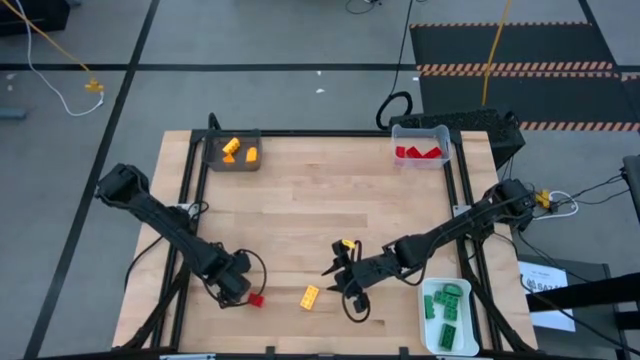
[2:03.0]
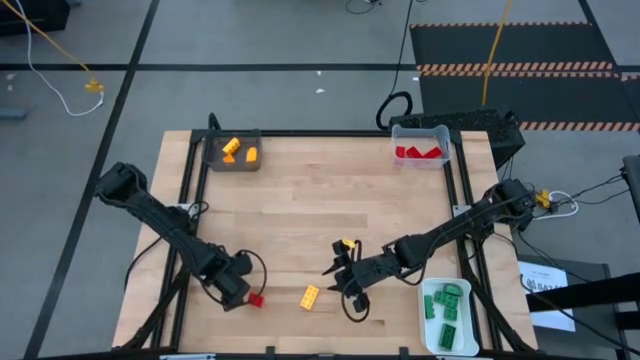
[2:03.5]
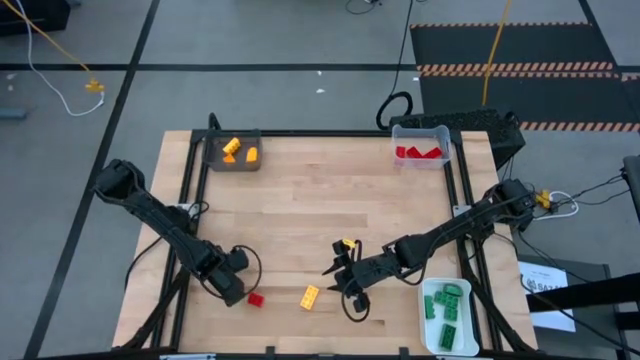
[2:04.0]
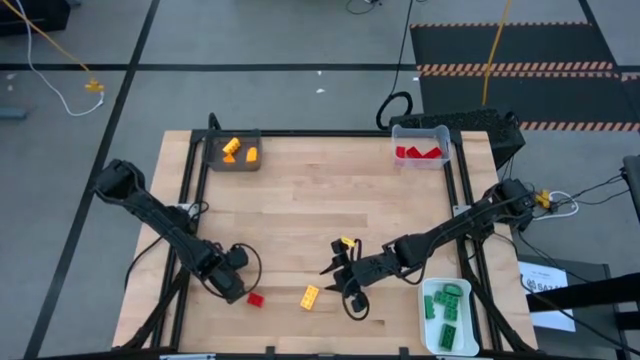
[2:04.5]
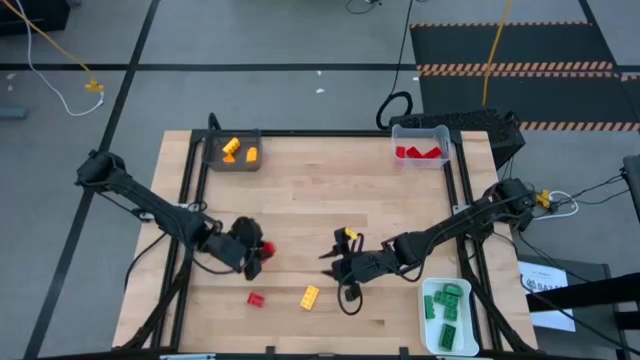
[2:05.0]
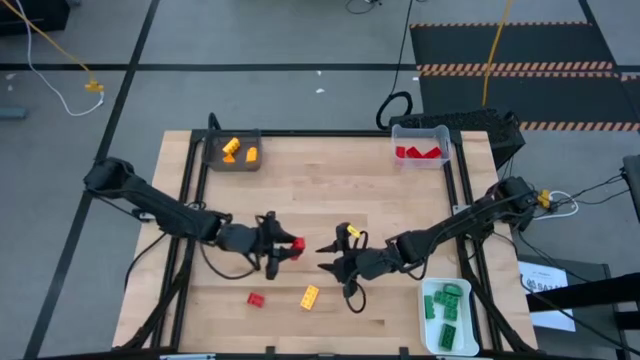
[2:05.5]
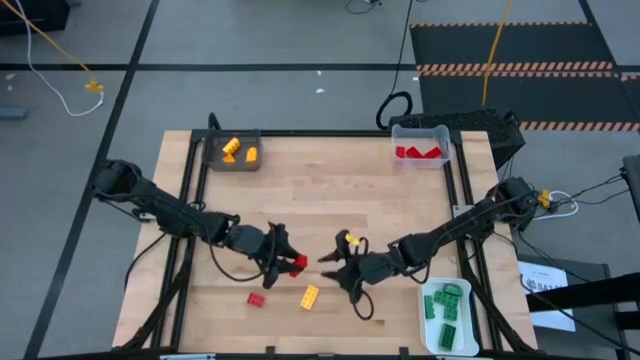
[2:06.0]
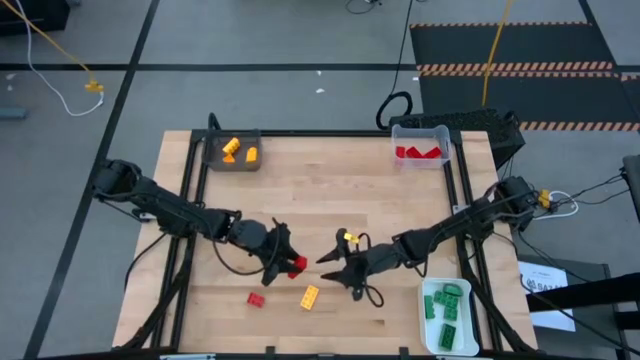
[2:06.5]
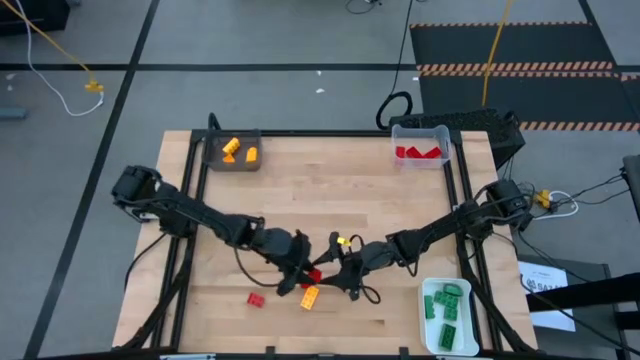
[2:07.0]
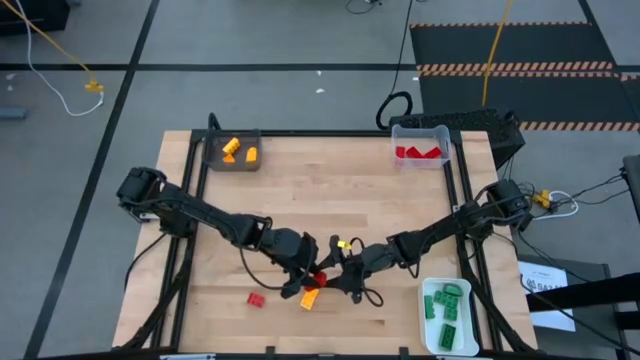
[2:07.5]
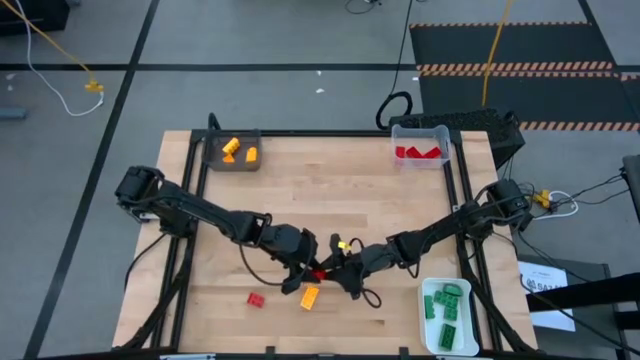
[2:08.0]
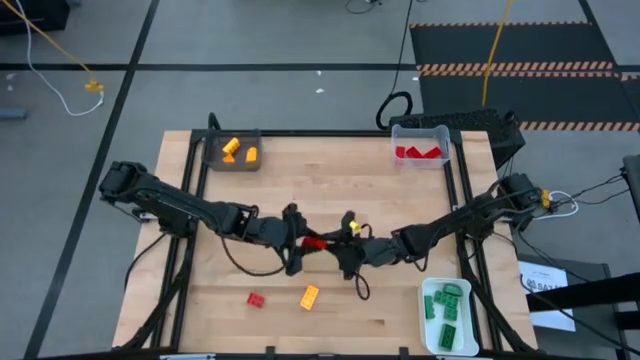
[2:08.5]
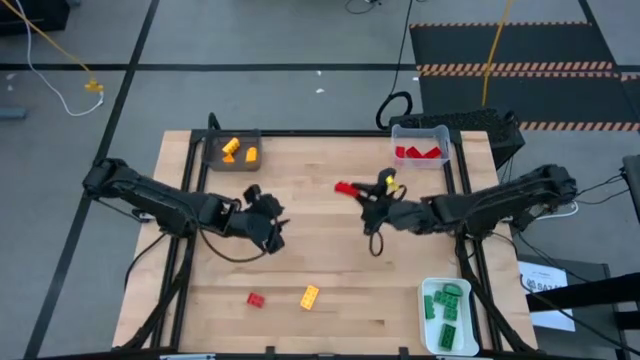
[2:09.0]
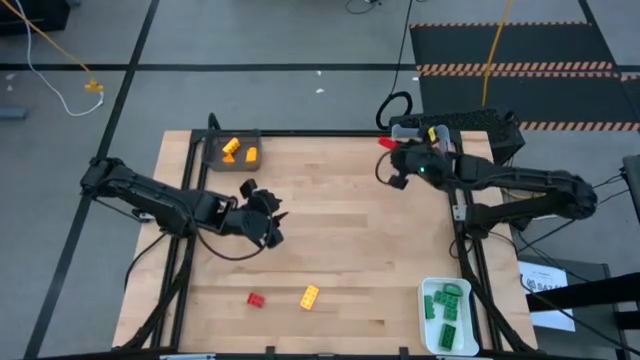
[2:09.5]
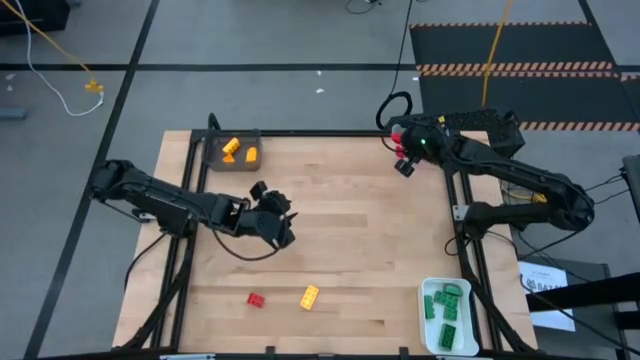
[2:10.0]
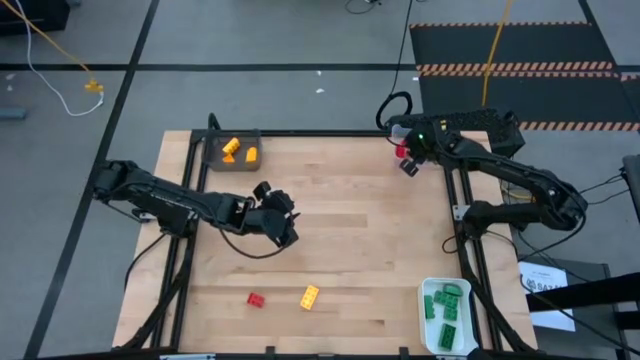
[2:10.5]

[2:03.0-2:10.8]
Task: Sort & place blocks by color
Put the red gamepiece into the transparent bin

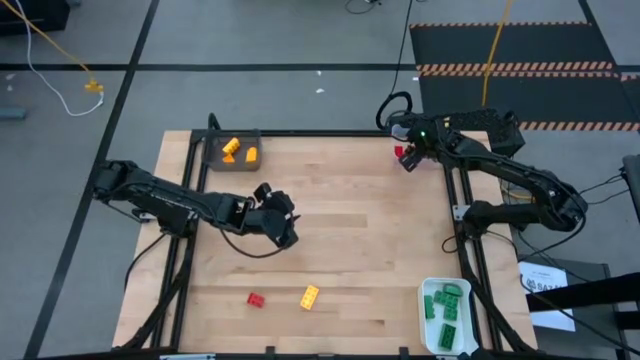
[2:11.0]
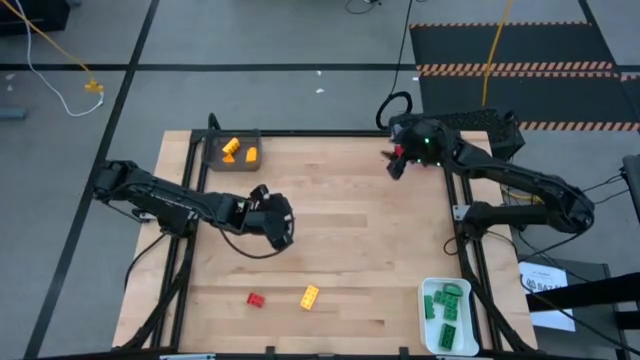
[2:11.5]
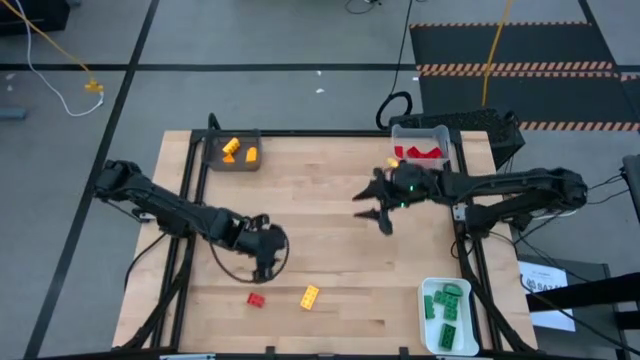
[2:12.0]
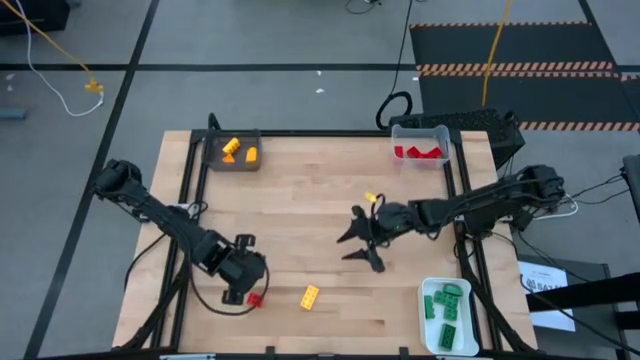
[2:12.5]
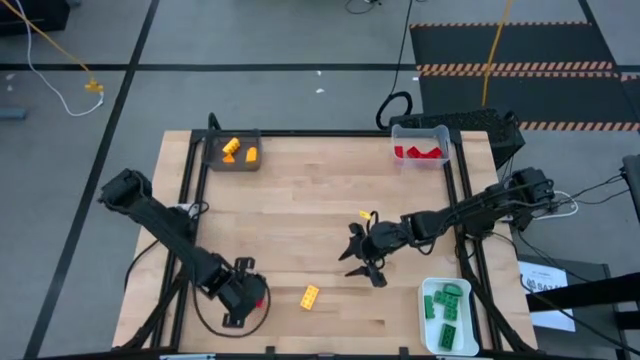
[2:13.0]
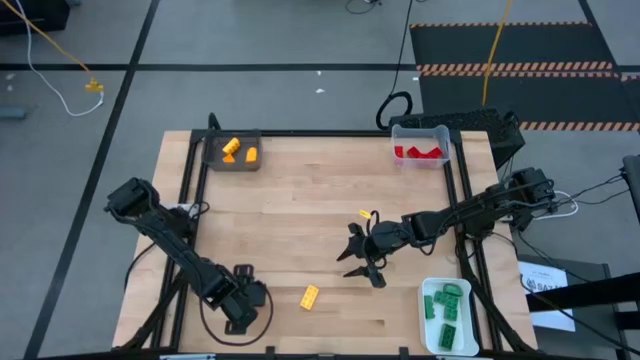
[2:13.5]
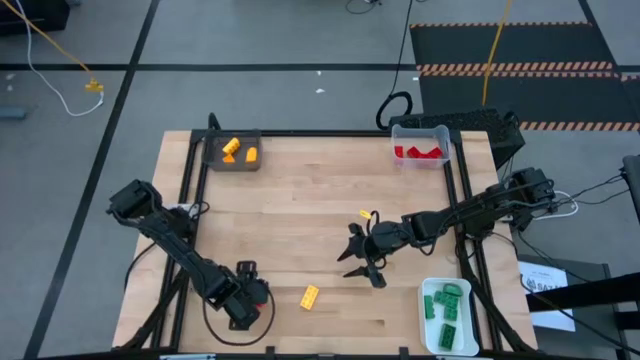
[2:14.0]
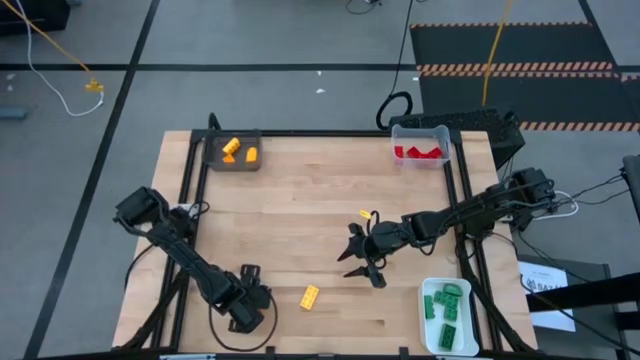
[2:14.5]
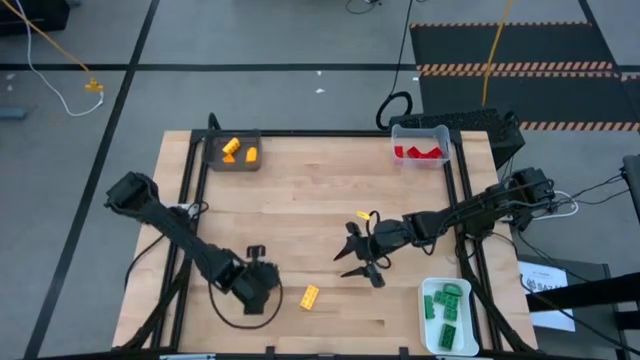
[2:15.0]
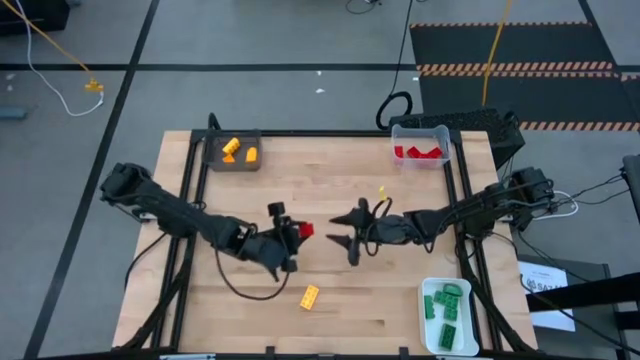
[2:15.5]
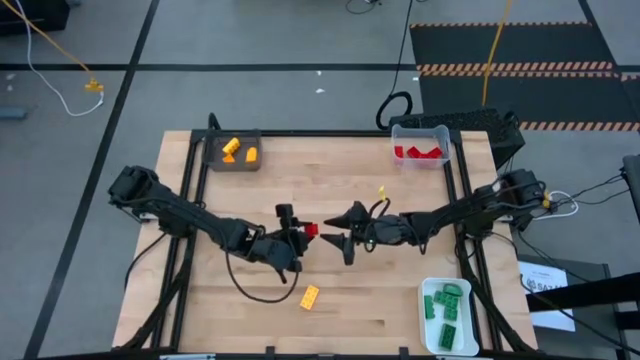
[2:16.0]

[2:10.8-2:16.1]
Put the red gamepiece into the transparent bin

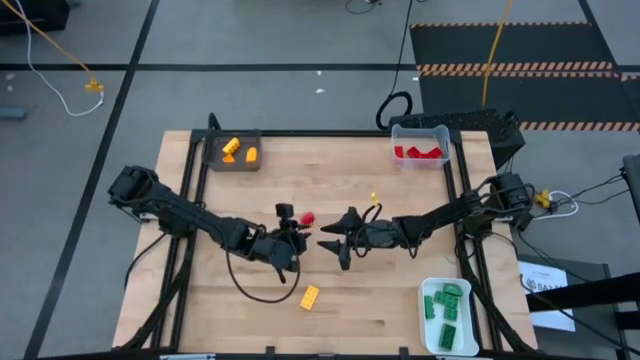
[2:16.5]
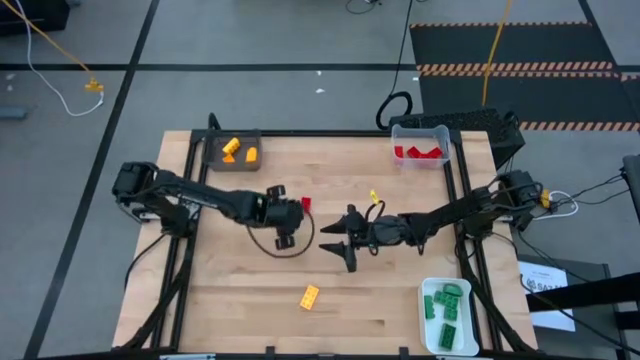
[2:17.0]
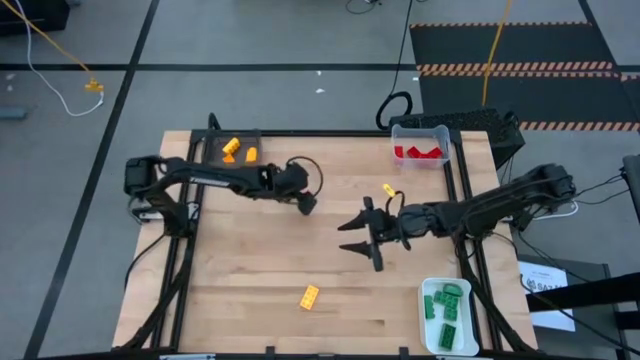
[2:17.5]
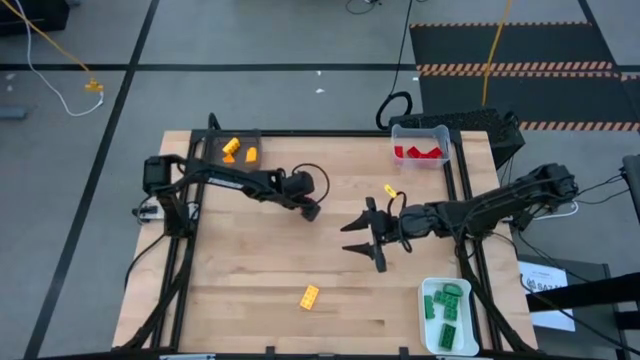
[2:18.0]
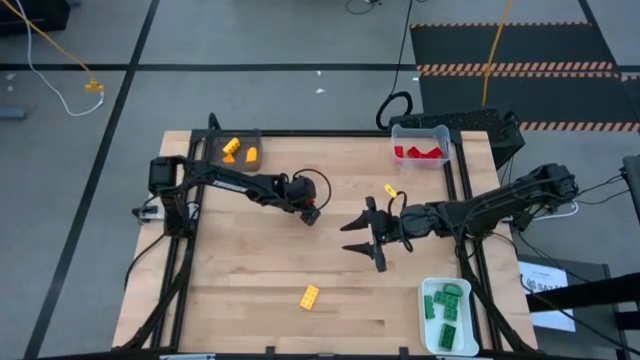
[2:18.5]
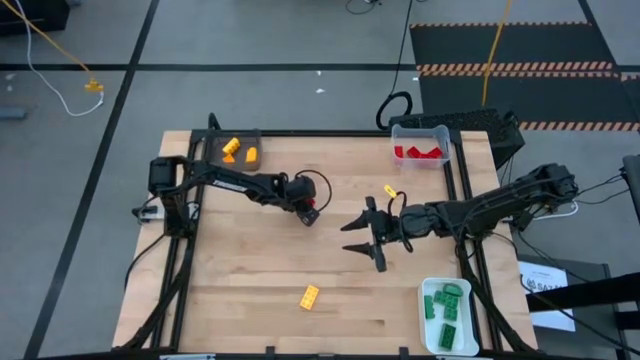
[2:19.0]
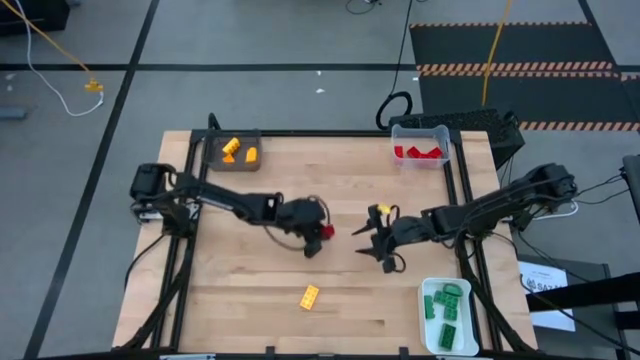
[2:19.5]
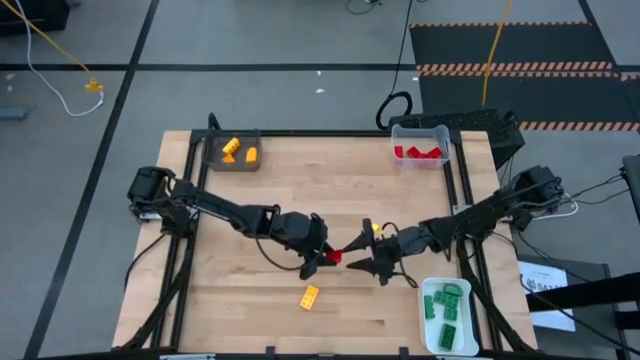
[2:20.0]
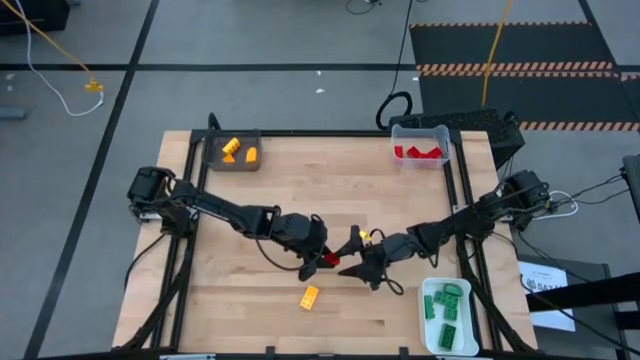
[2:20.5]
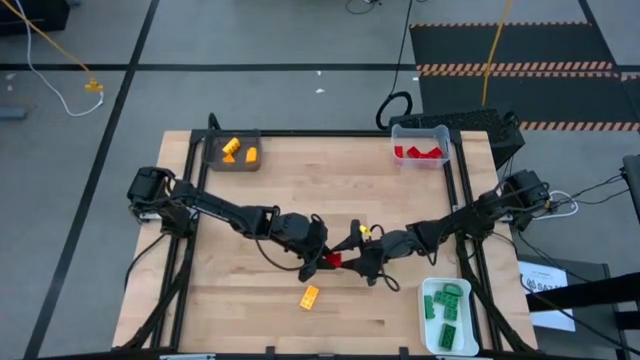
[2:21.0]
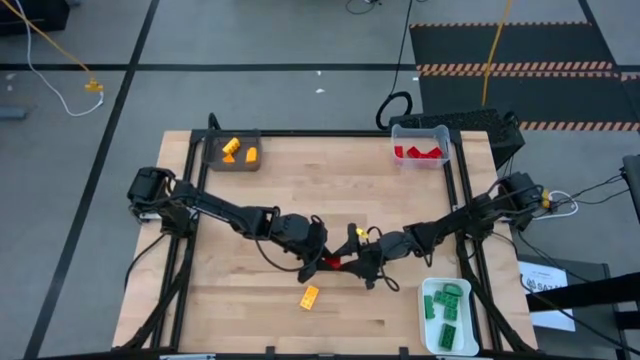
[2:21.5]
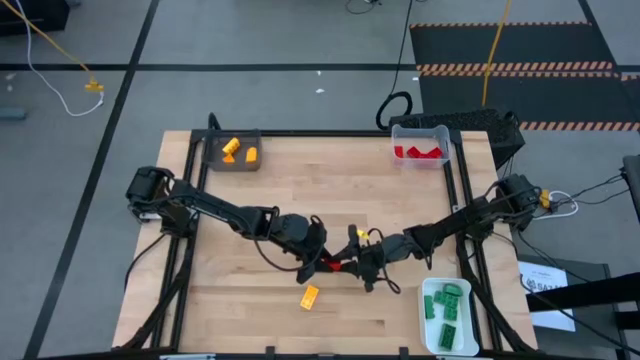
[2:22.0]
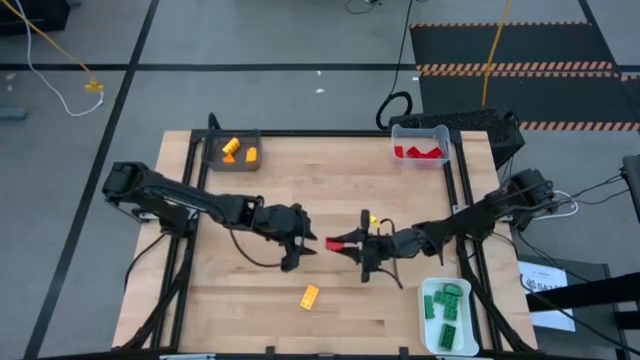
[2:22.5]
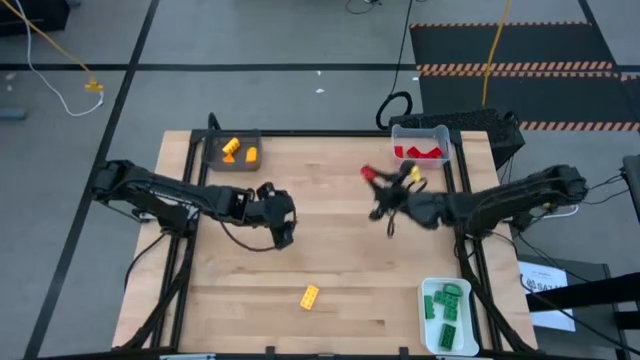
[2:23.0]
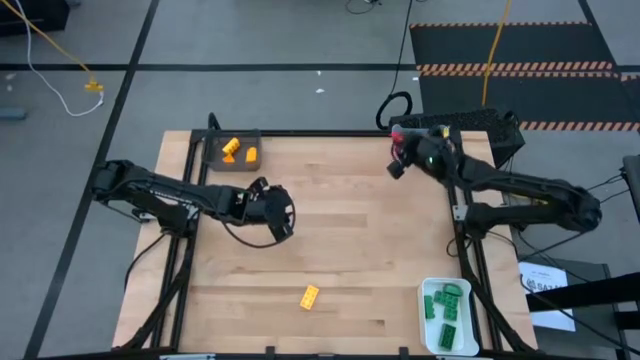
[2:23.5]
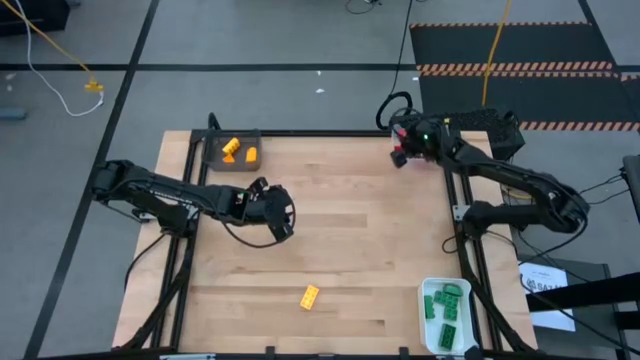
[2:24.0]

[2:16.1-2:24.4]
Put the red gamepiece into the transparent bin
